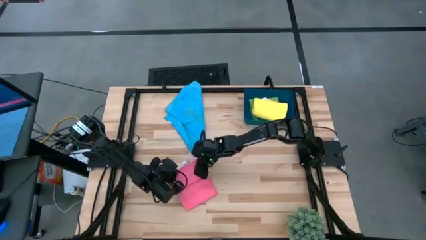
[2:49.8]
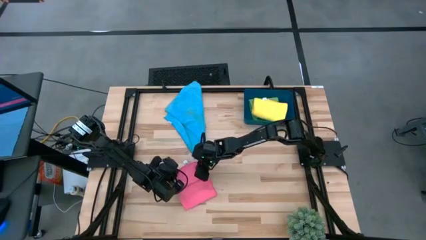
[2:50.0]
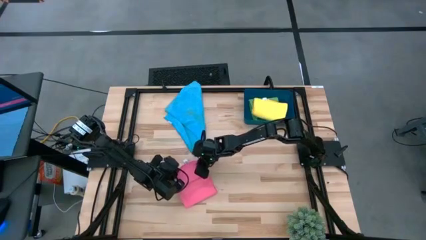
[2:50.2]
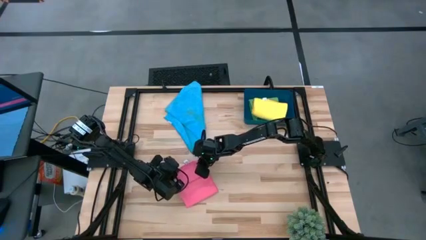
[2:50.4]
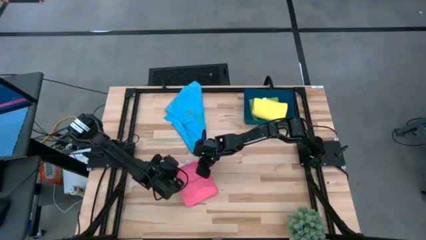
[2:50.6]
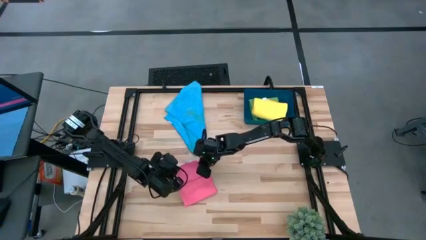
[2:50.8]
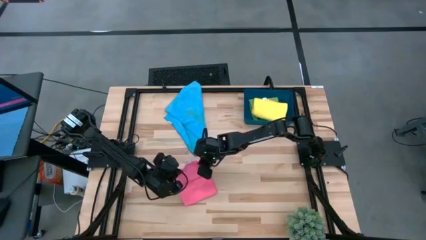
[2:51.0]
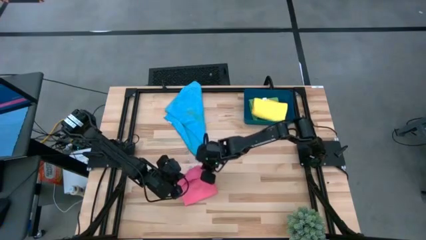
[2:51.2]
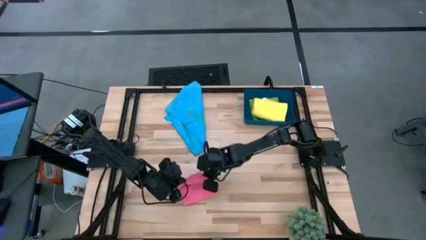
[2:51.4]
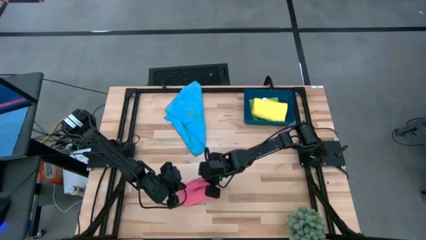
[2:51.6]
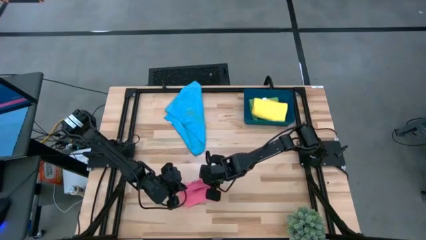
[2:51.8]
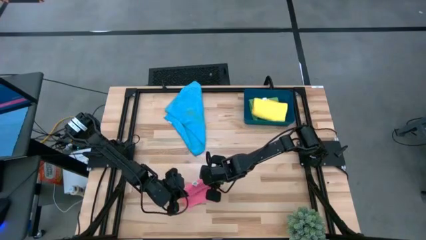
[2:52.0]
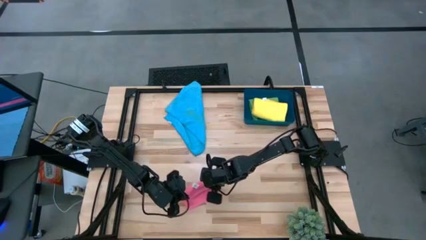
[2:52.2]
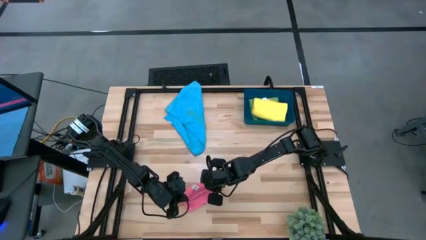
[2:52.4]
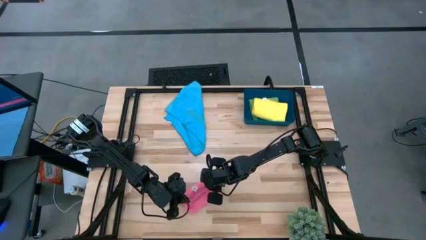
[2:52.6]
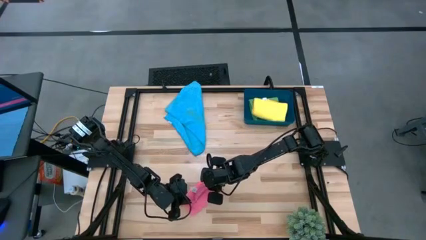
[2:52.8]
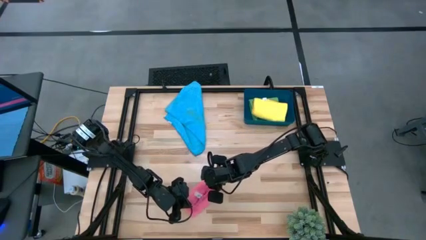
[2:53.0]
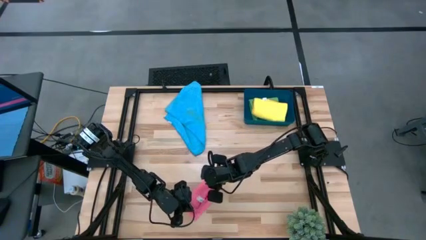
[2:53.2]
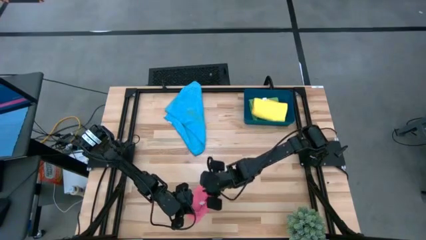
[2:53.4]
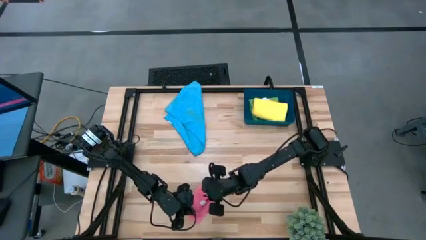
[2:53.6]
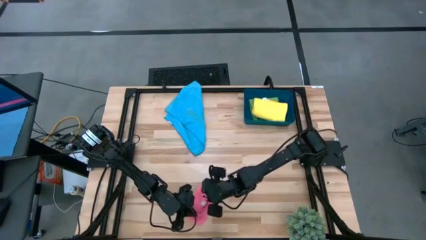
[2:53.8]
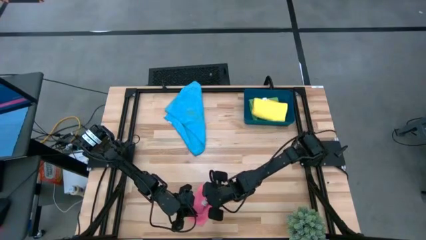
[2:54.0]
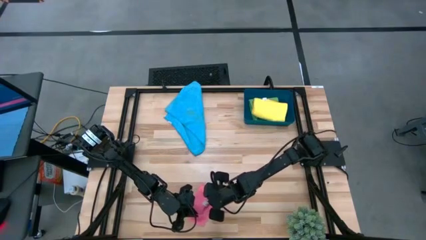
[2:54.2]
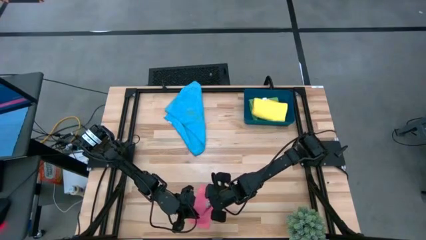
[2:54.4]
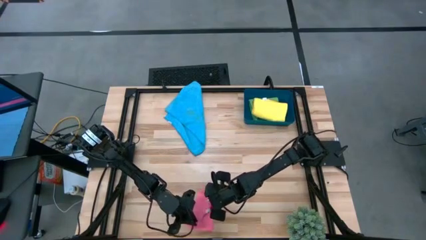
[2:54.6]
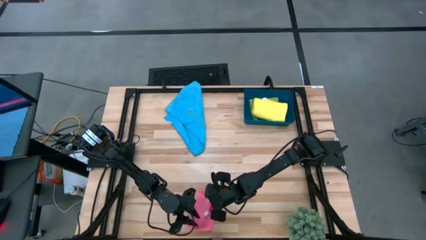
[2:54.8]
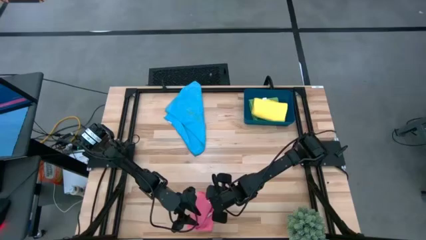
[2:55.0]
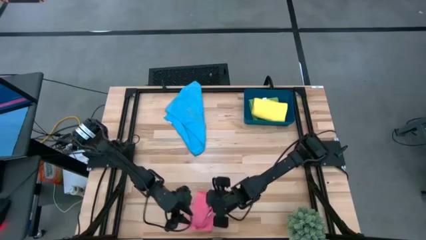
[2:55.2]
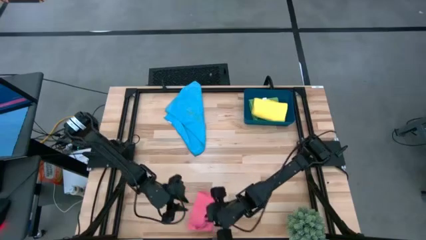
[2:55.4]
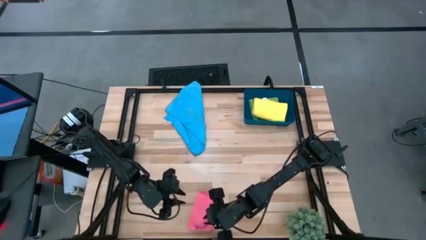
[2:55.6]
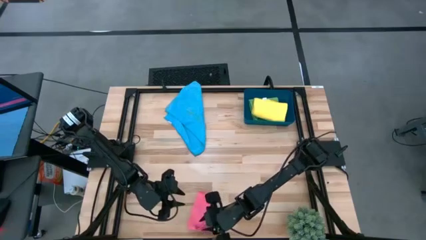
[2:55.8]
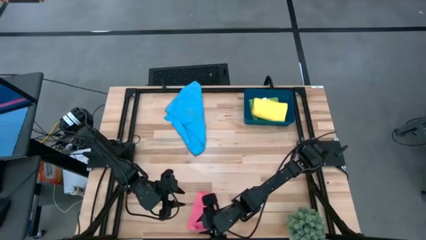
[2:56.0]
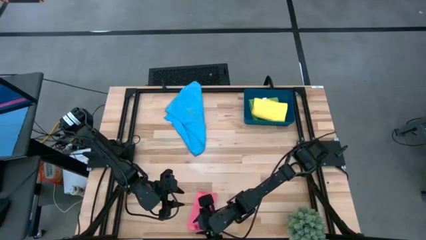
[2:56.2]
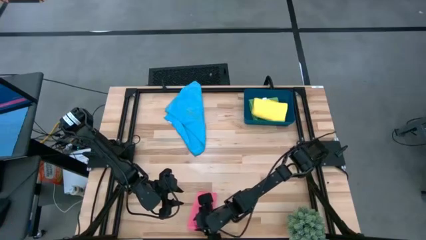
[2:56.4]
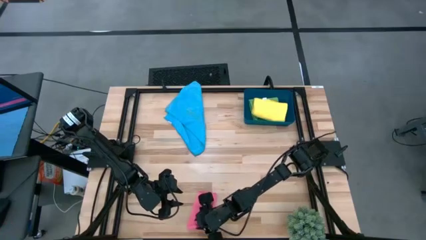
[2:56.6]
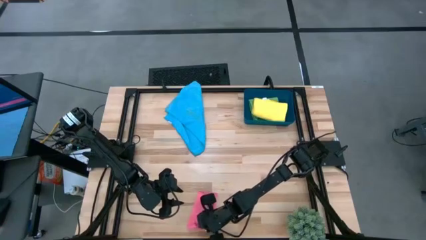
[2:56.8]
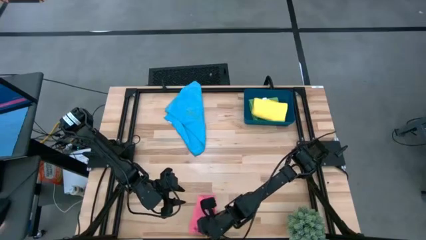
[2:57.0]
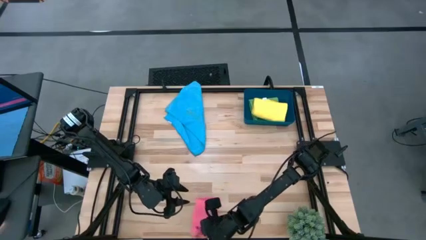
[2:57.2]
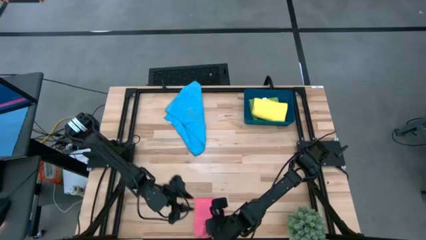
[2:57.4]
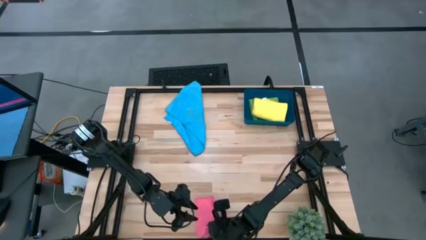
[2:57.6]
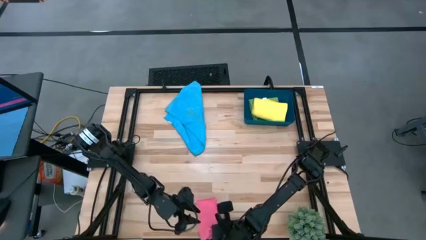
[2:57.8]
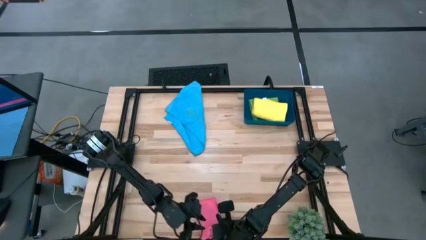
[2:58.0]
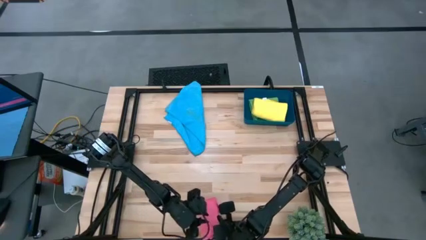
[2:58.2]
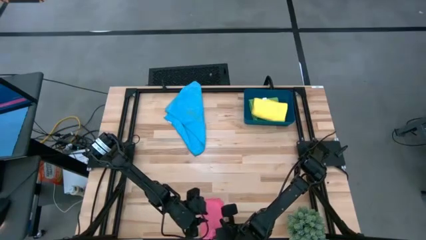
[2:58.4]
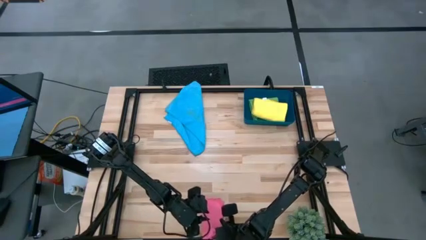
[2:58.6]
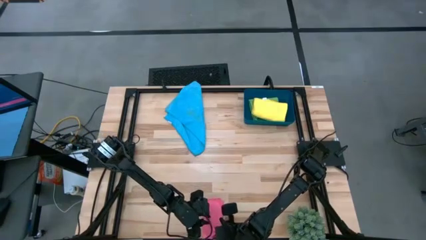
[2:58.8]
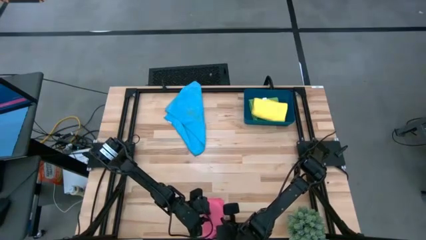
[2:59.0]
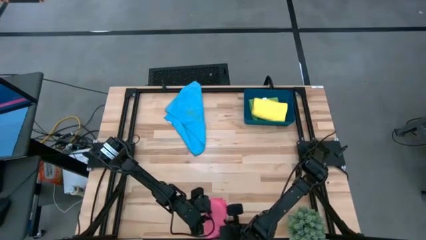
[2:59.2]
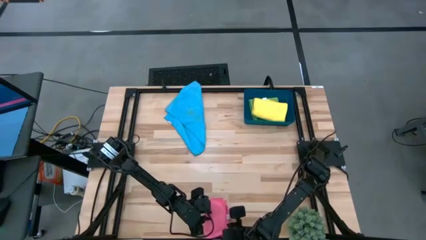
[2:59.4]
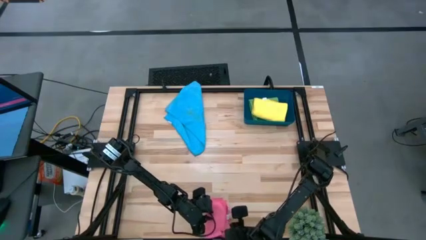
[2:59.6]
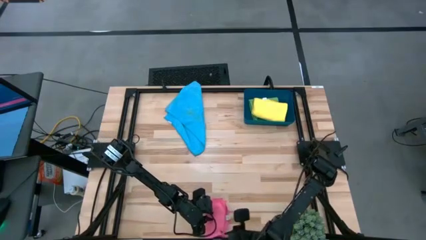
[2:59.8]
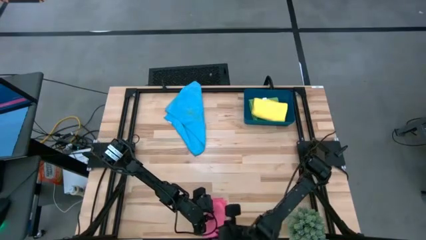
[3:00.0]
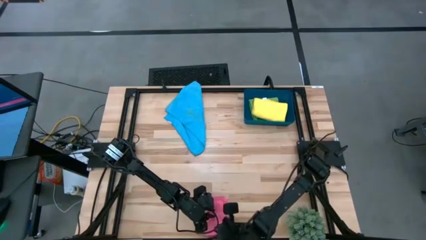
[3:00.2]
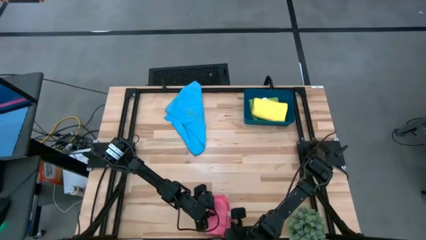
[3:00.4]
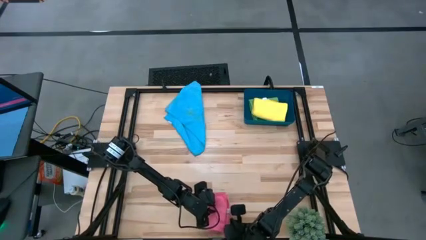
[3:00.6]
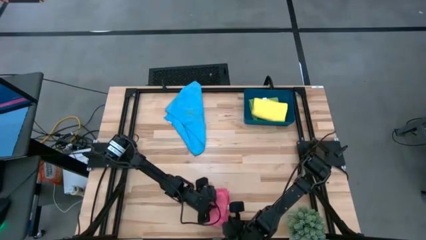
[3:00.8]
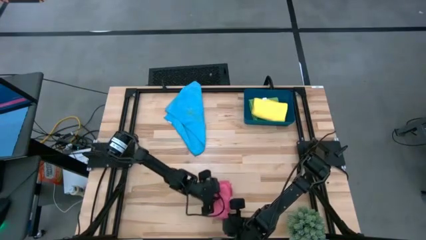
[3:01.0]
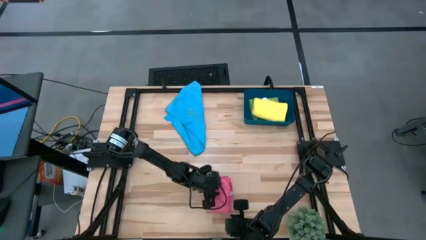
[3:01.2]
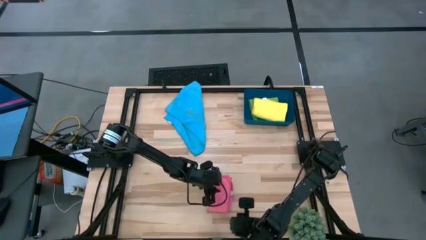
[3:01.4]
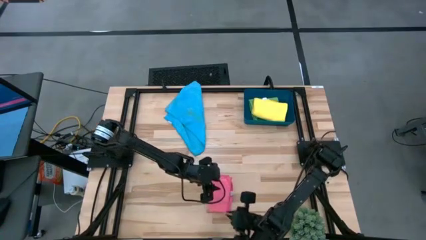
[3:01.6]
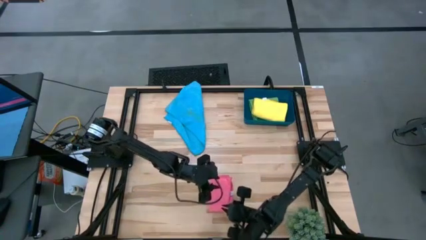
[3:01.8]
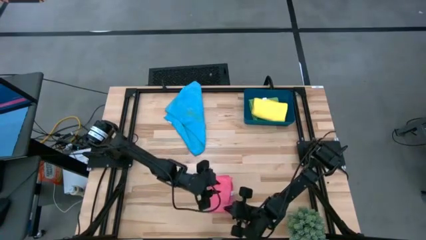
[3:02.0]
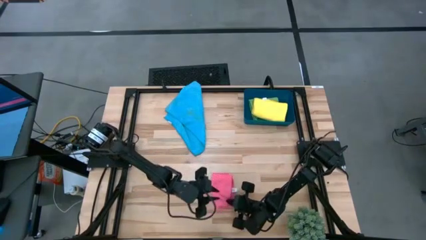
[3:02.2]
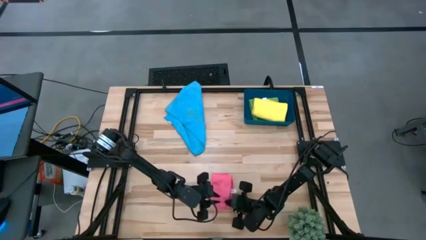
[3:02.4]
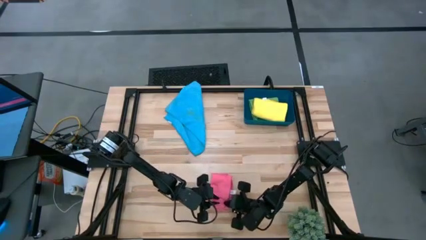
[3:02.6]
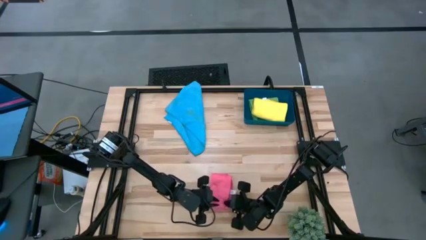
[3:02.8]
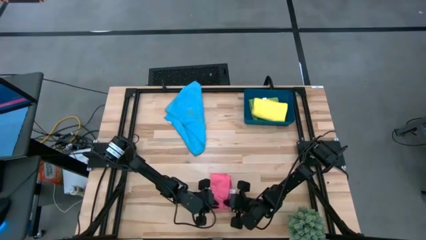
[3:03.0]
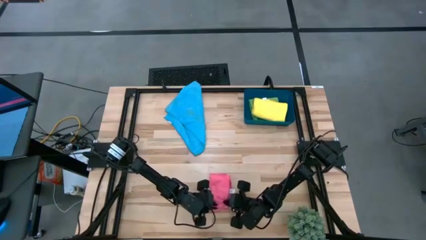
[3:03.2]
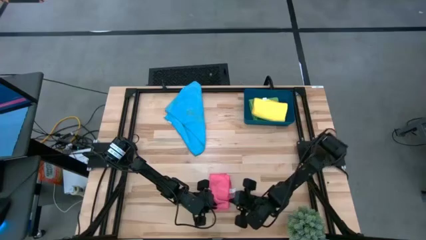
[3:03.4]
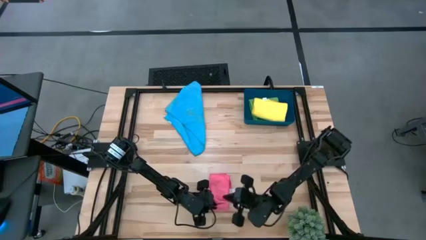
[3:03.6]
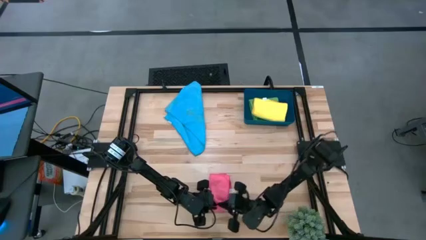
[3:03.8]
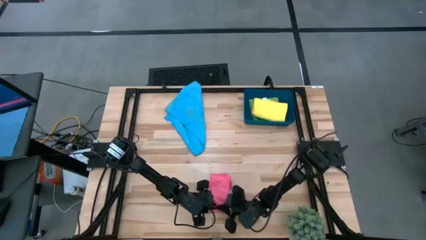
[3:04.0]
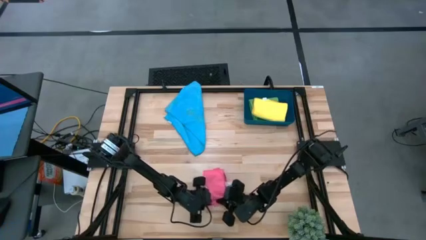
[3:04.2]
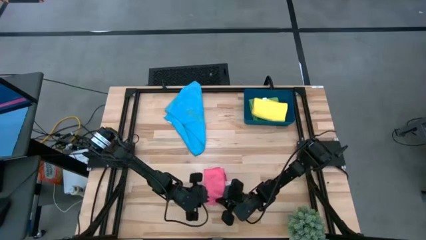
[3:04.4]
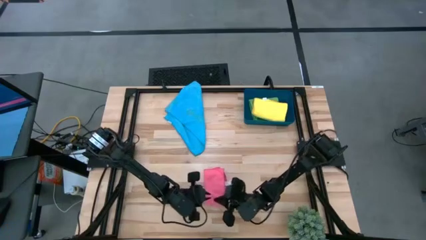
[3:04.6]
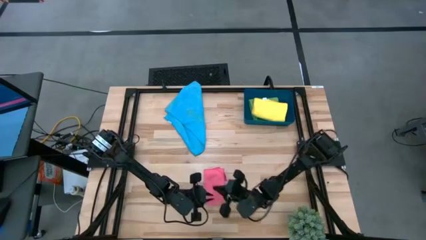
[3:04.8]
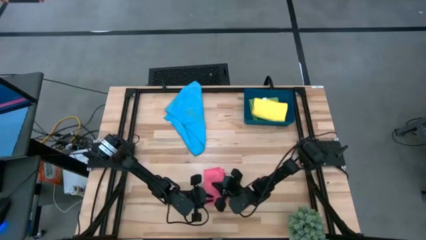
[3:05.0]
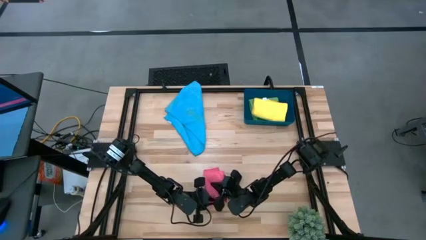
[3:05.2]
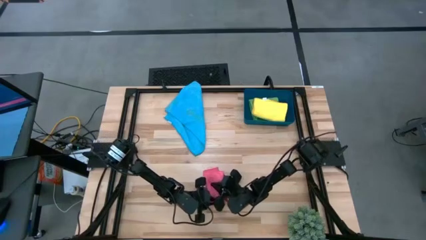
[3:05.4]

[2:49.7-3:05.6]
Task: Fold microfiber towels
Fold the pink microfiber towel

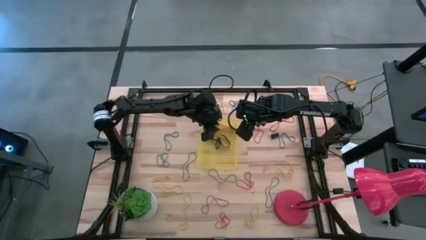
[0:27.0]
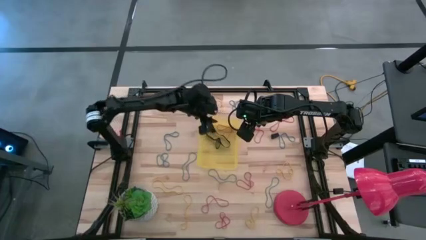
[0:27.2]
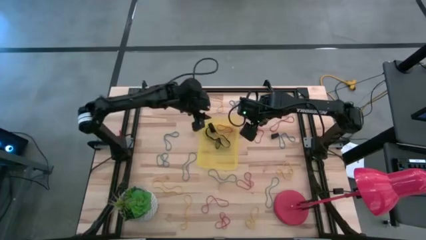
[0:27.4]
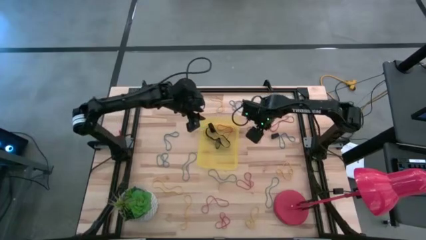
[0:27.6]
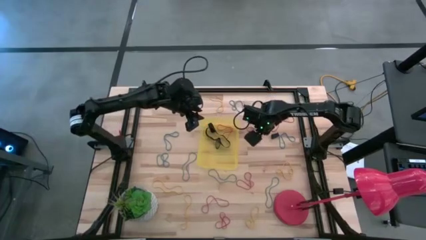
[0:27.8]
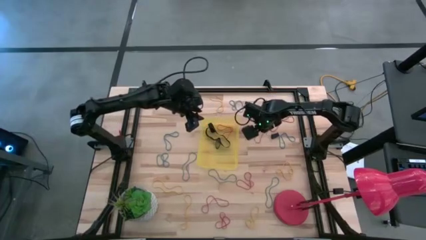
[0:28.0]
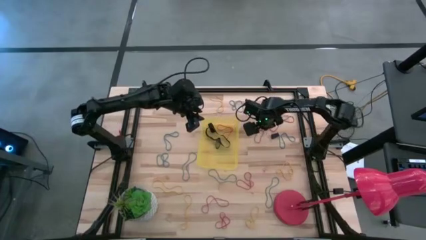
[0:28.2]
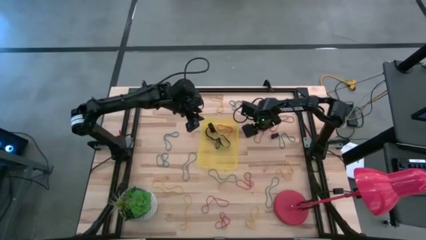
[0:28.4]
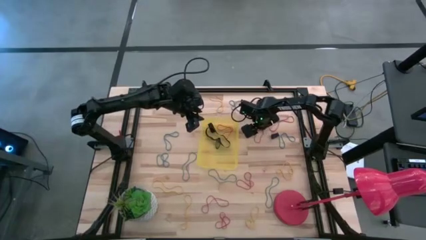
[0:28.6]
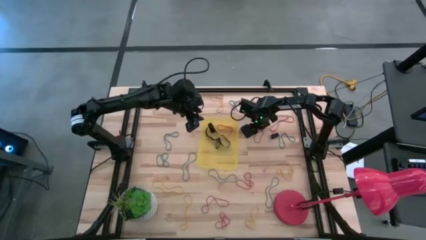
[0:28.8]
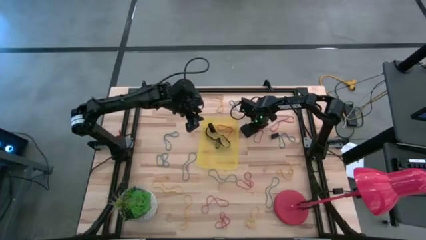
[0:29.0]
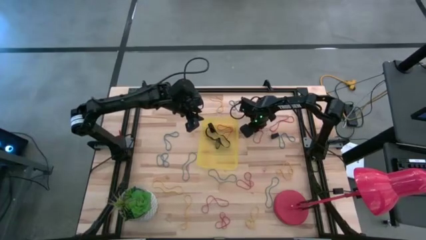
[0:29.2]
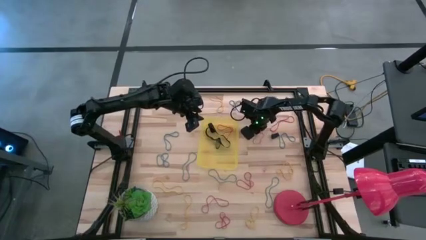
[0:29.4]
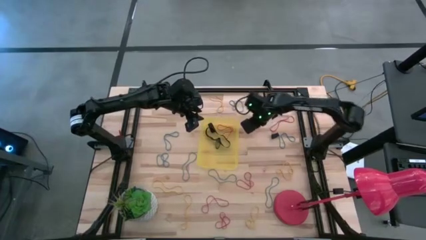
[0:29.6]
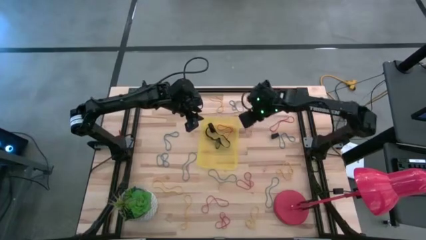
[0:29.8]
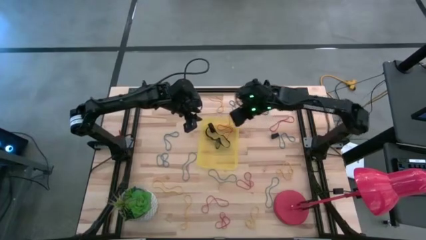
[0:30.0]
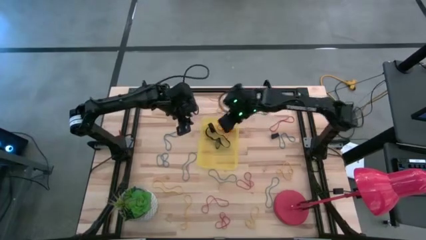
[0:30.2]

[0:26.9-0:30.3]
Task: Pick and place rubber bands into bin
Put the red rubber band into the yellow bin
